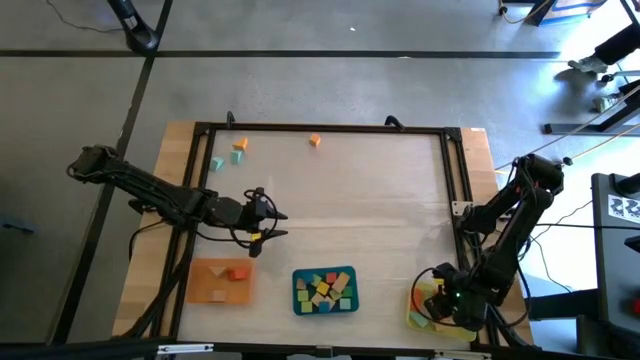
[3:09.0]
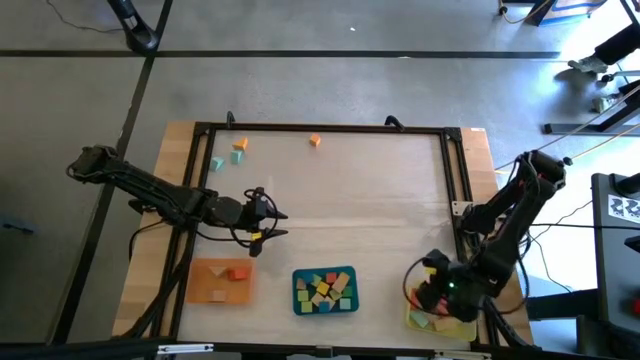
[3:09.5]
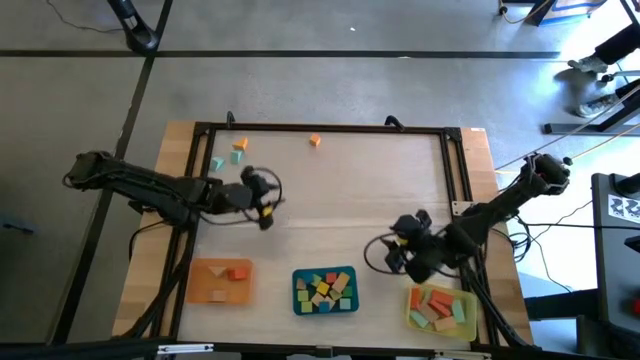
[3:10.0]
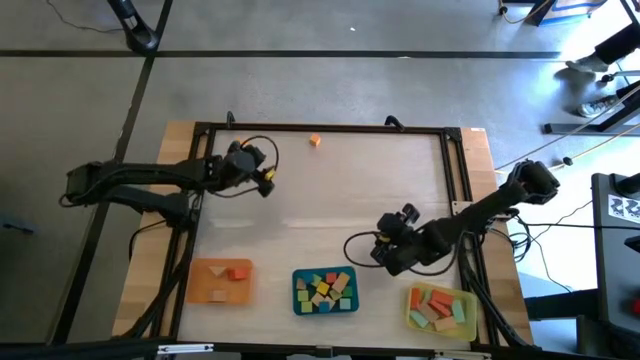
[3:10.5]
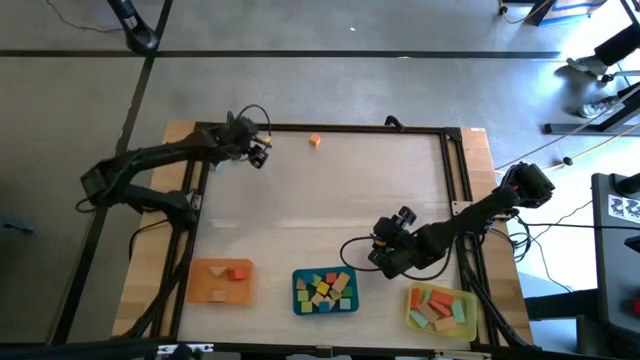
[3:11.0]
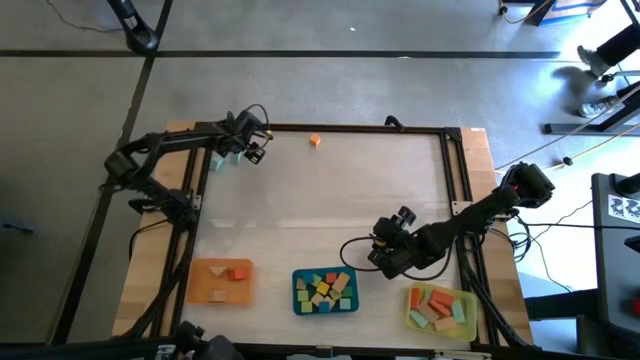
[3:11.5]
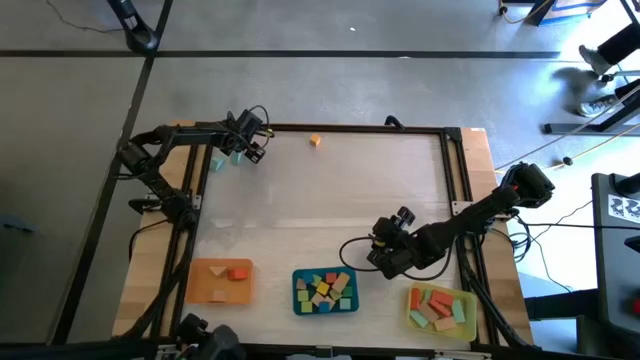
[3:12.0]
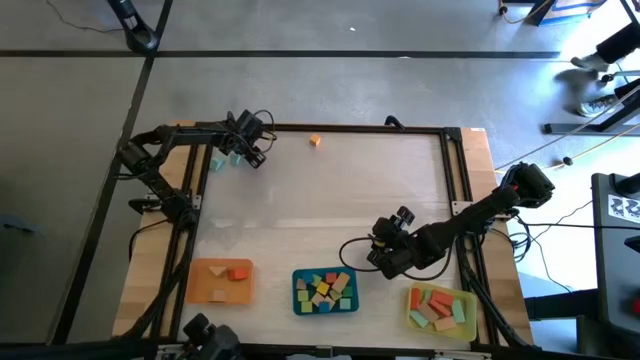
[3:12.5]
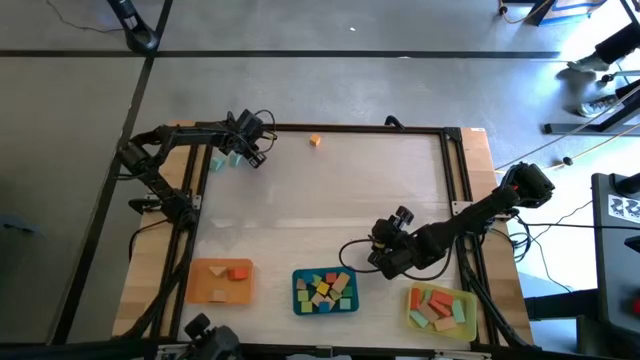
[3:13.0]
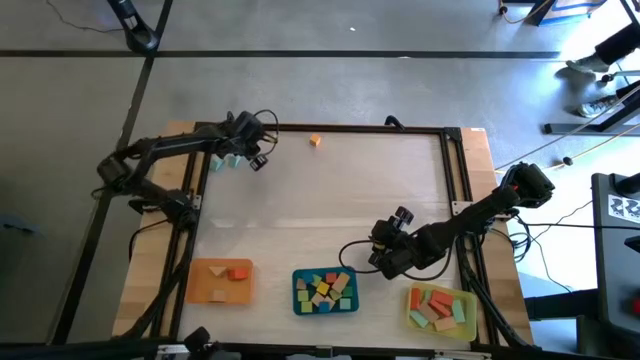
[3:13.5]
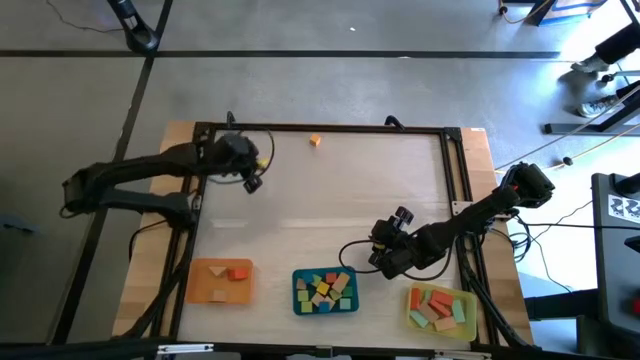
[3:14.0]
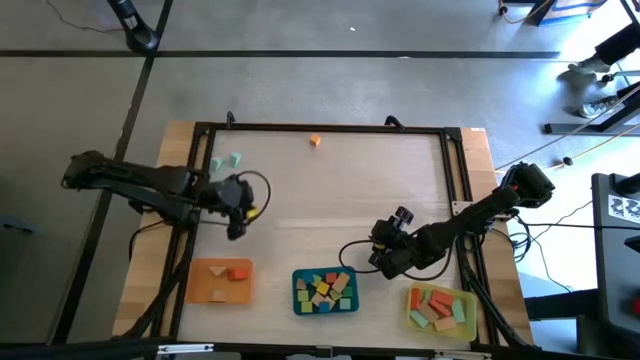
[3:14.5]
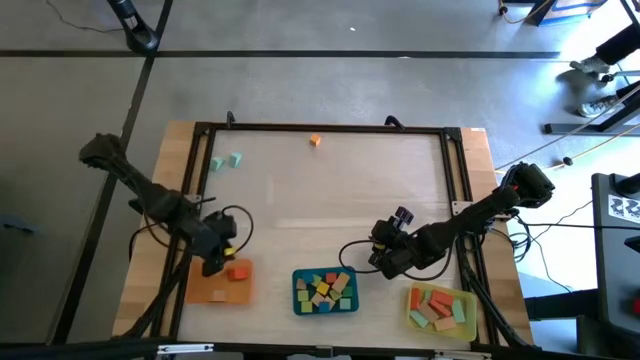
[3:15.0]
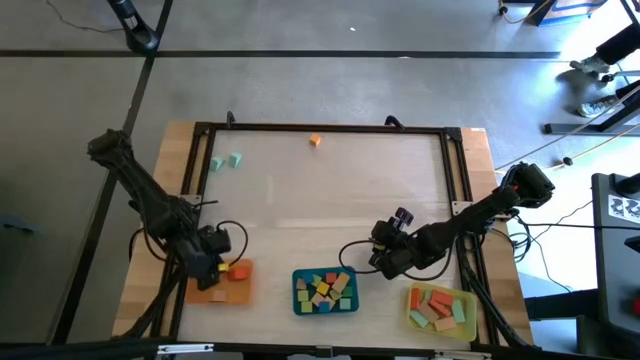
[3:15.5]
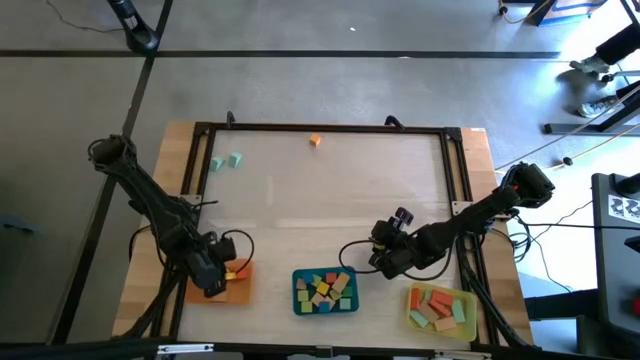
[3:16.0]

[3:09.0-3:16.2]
Task: Sort blocks by size
Put the yellow triangular block into the orange bin

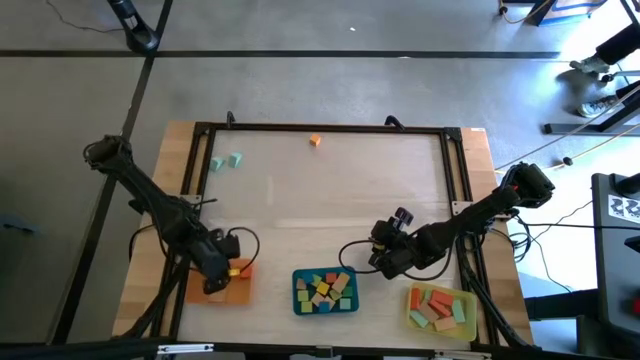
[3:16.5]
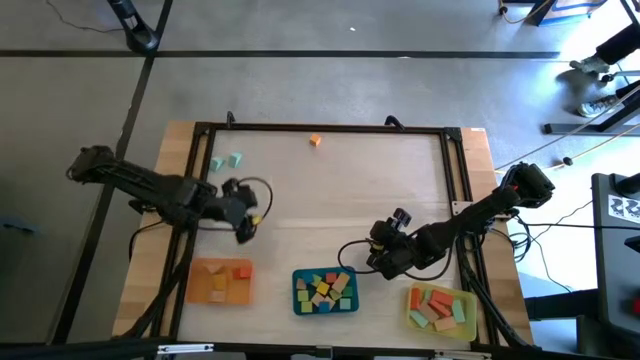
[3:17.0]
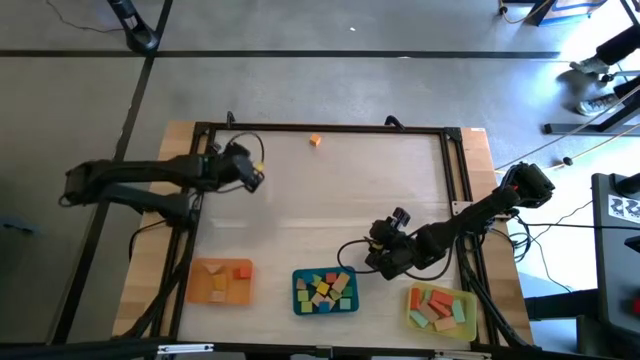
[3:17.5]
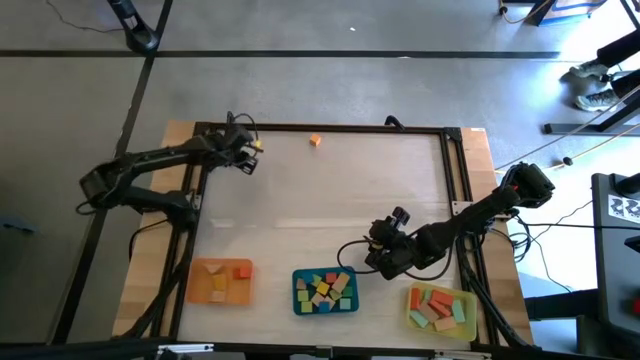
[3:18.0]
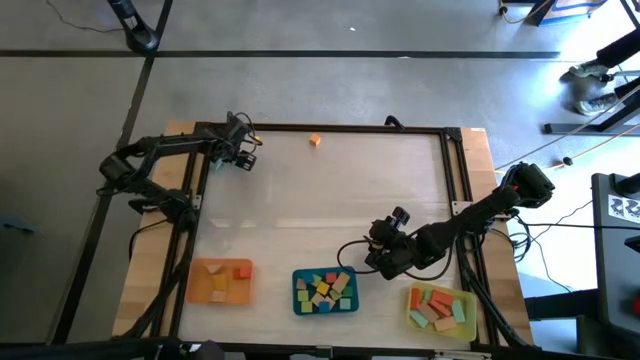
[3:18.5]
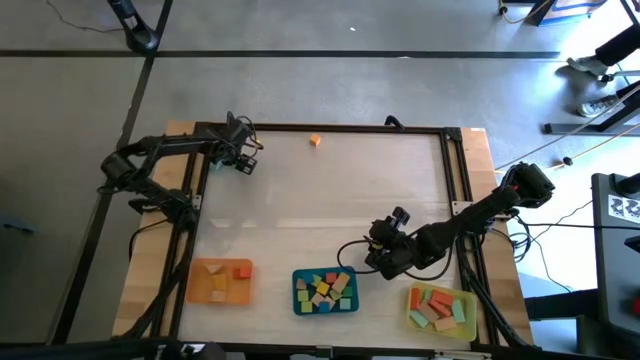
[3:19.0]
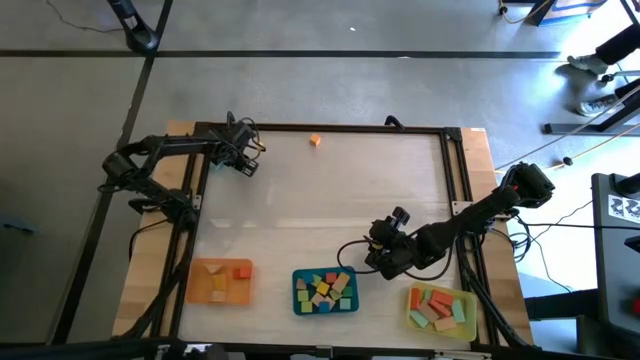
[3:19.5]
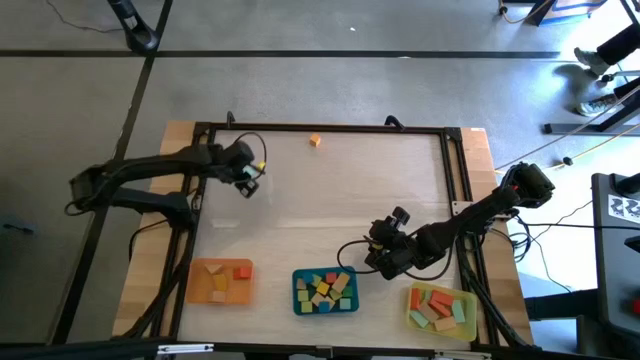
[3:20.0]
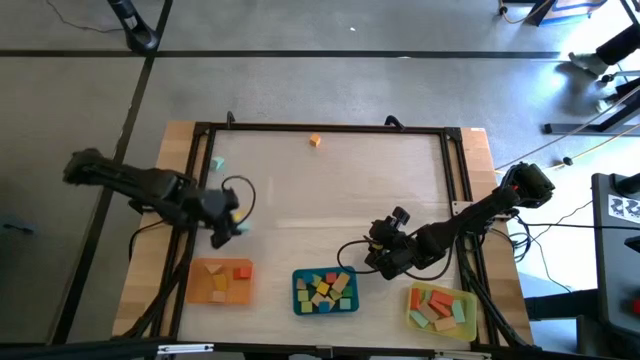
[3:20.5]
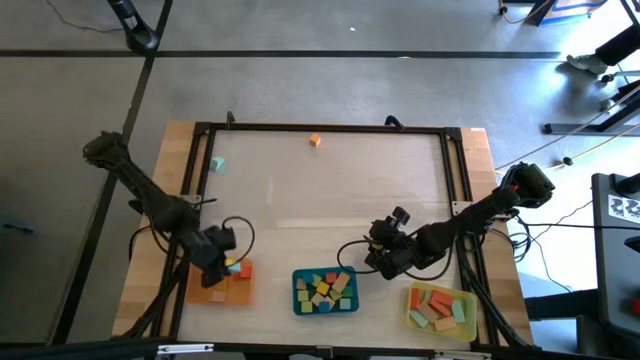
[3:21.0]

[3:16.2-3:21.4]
Put the light blue triangular block into the orange bin

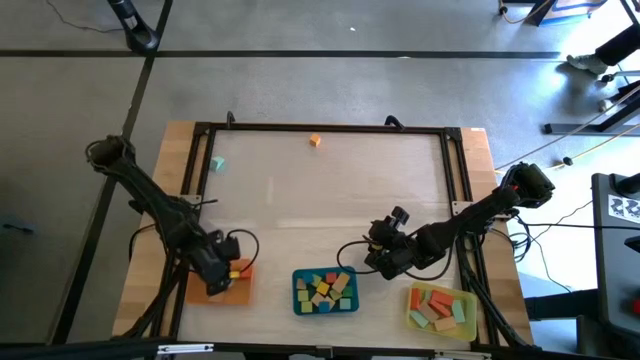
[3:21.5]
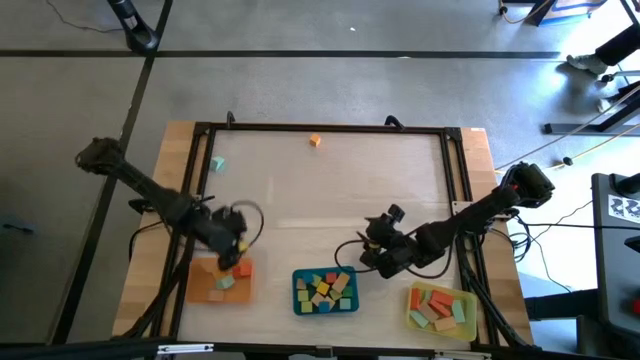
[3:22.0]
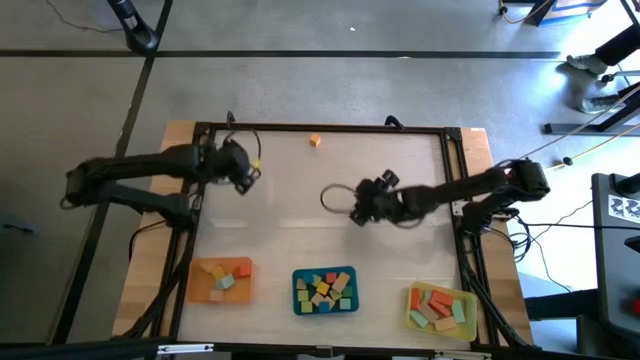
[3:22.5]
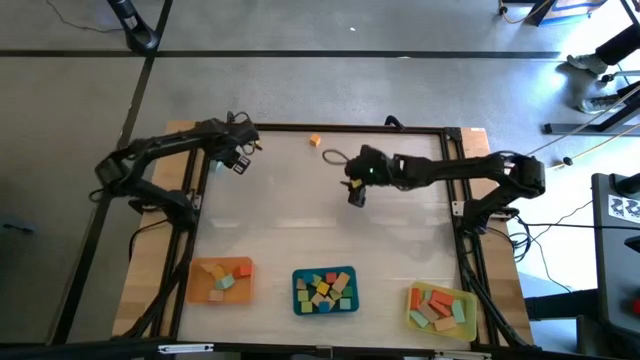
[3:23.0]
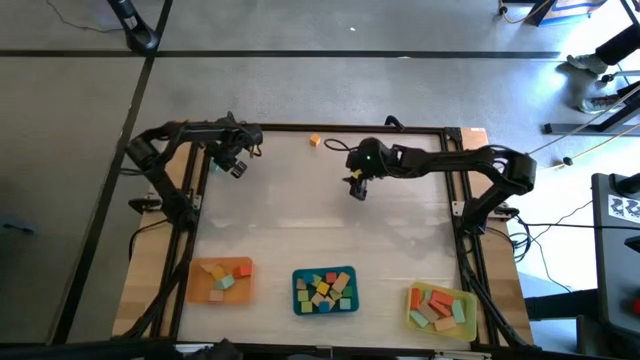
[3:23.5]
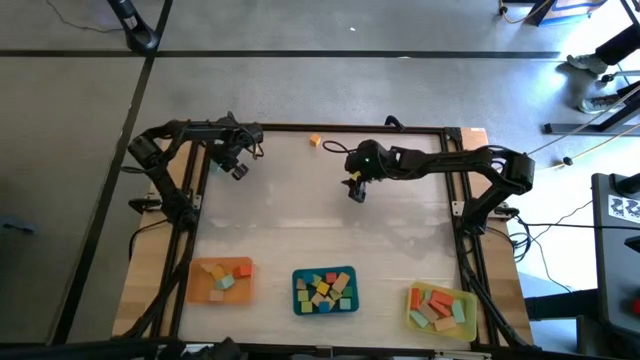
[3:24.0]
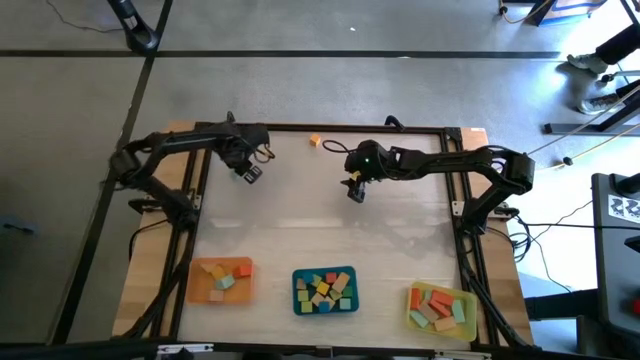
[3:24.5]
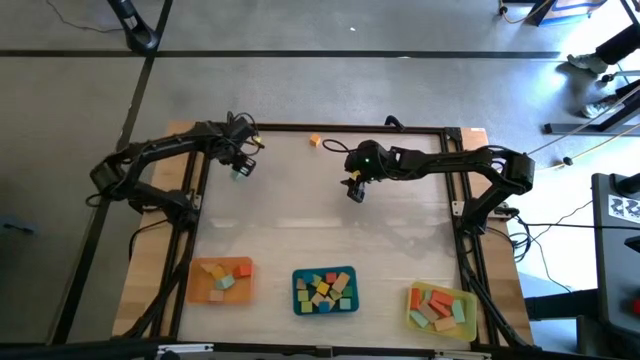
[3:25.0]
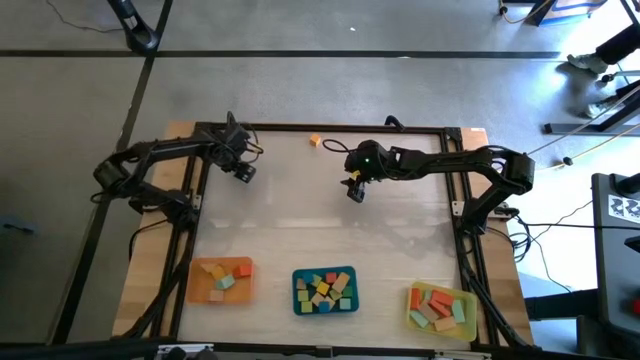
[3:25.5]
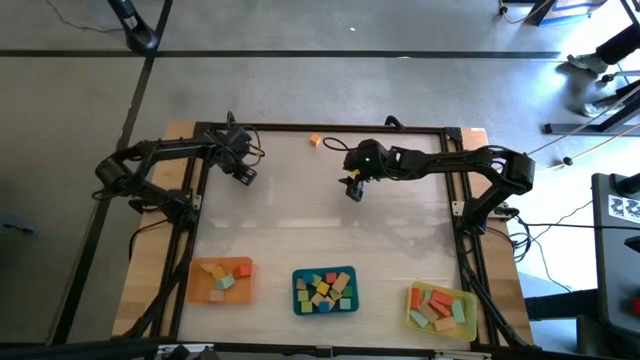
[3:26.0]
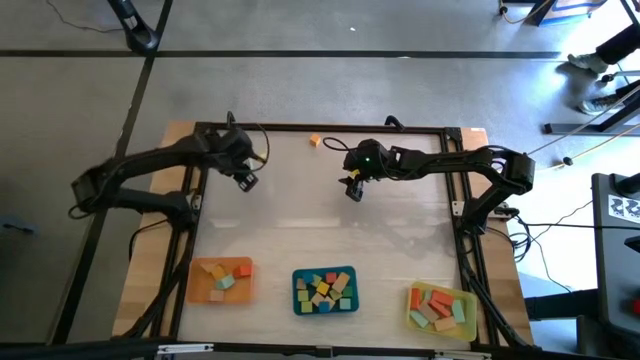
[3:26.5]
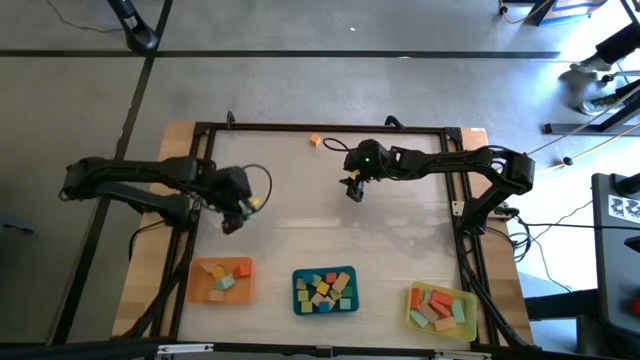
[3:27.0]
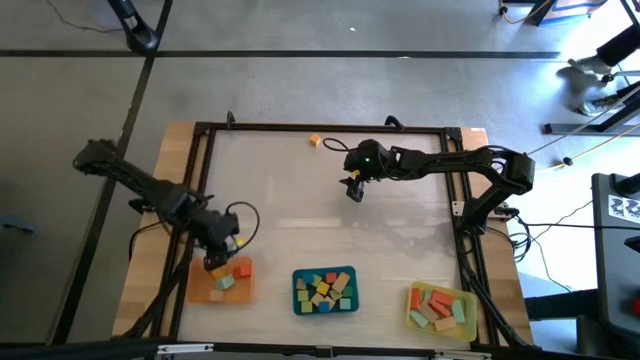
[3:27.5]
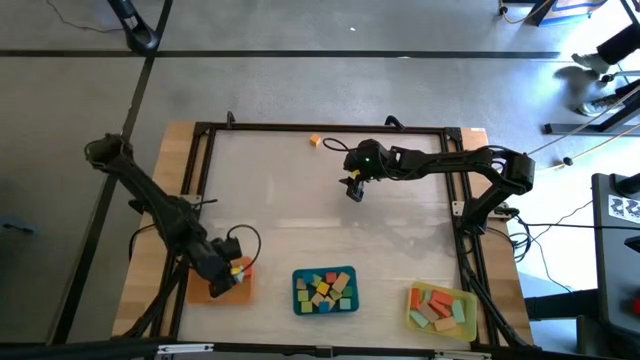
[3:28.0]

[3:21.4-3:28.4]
Put the light blue triangular block into the orange bin

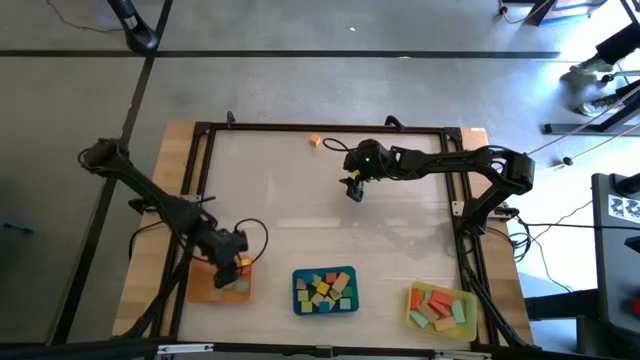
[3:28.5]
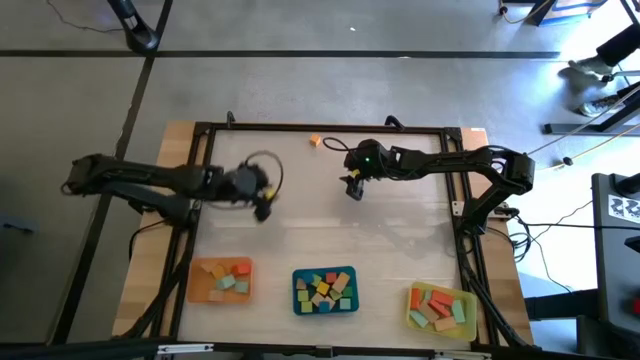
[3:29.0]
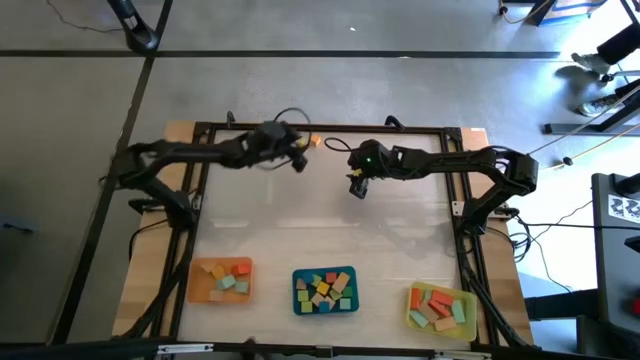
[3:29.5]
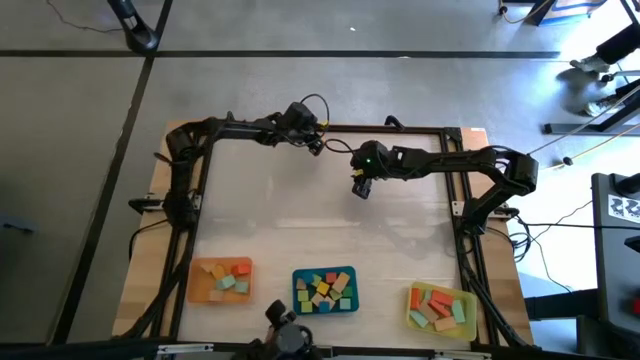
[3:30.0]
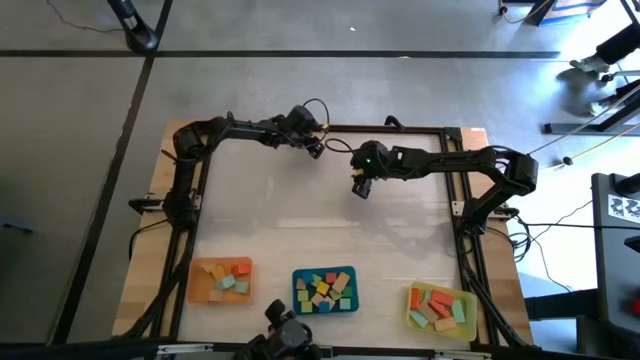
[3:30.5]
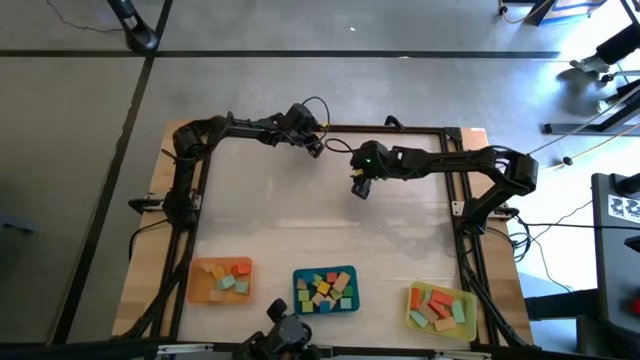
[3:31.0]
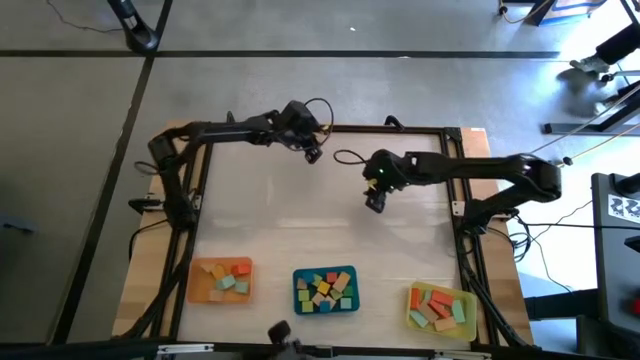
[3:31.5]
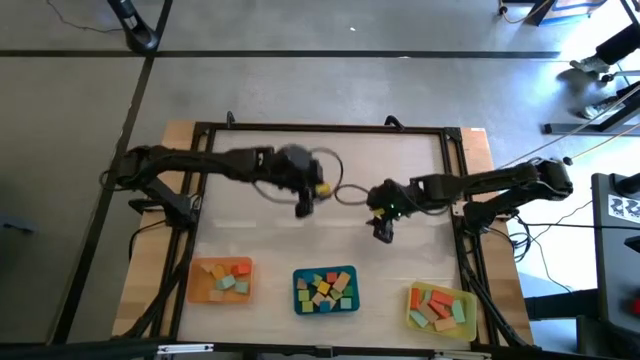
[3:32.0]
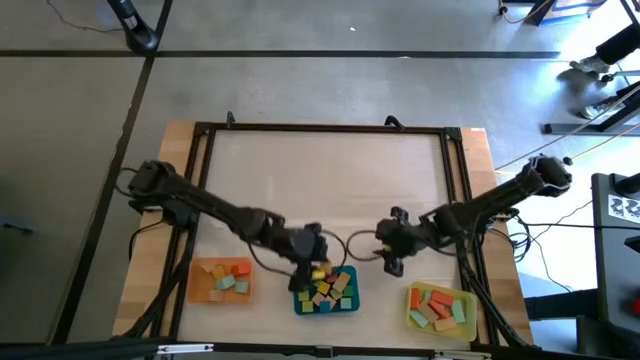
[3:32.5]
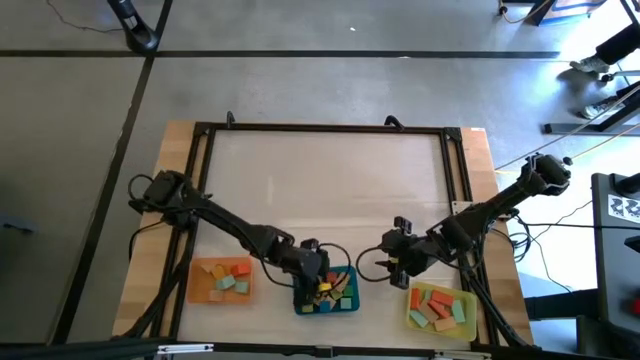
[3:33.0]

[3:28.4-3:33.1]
Put the yellow cube block into the blue bin
